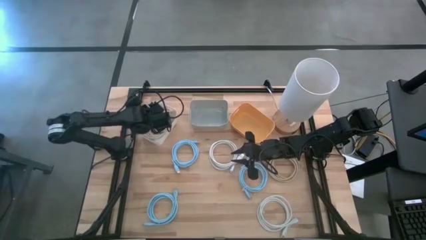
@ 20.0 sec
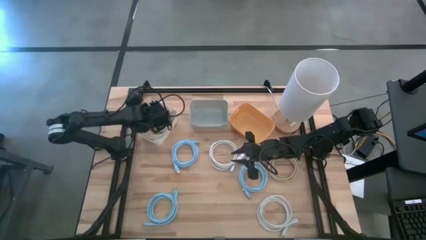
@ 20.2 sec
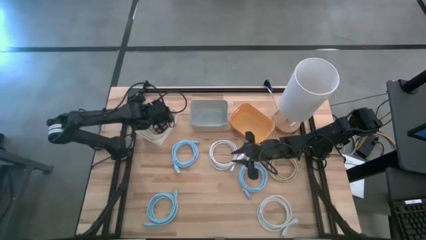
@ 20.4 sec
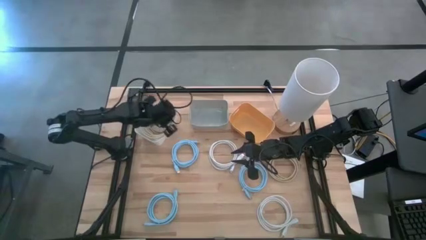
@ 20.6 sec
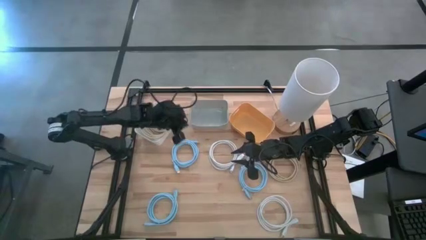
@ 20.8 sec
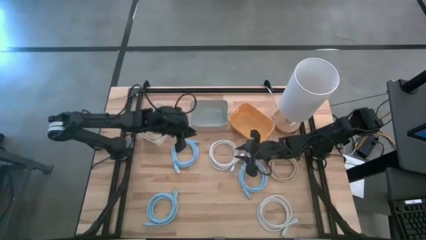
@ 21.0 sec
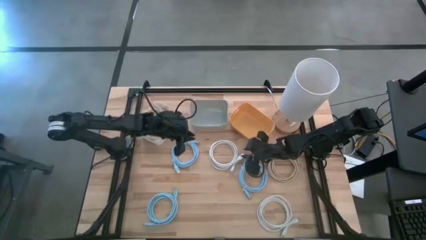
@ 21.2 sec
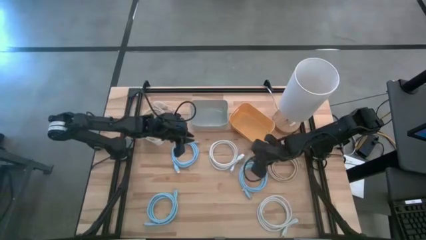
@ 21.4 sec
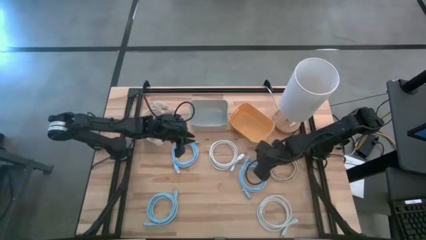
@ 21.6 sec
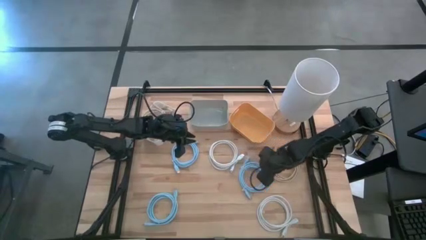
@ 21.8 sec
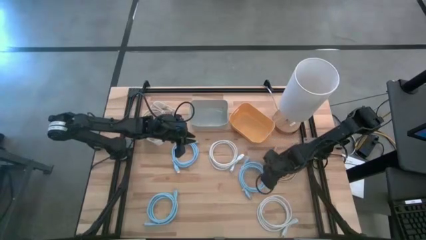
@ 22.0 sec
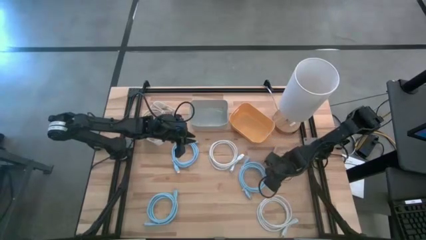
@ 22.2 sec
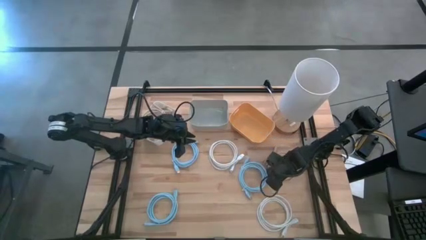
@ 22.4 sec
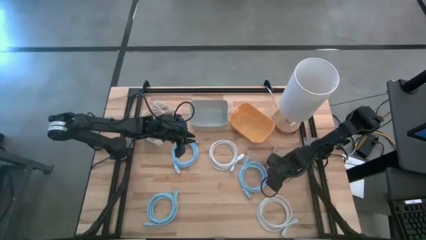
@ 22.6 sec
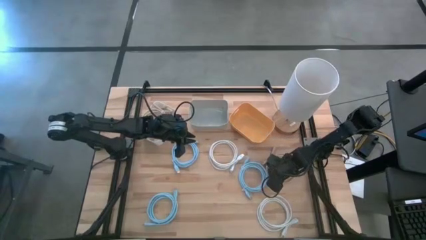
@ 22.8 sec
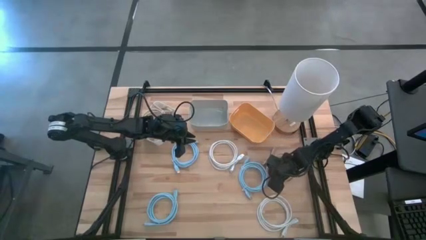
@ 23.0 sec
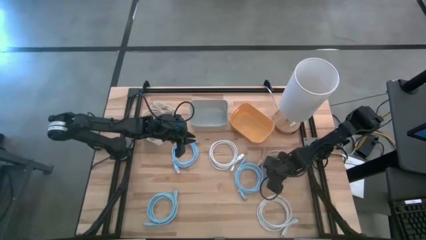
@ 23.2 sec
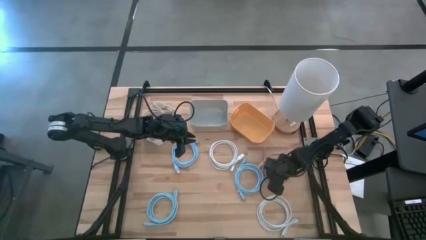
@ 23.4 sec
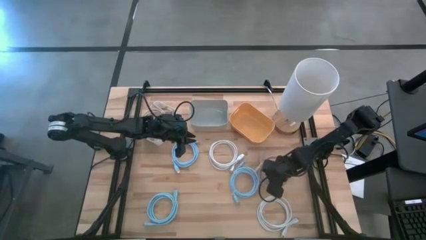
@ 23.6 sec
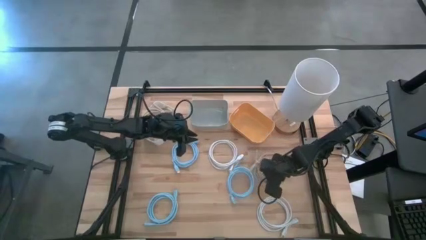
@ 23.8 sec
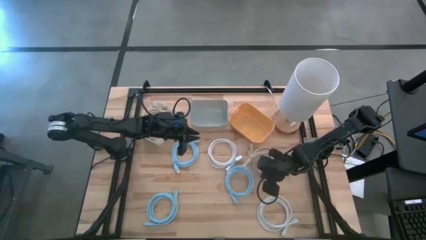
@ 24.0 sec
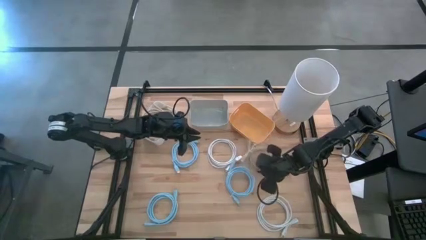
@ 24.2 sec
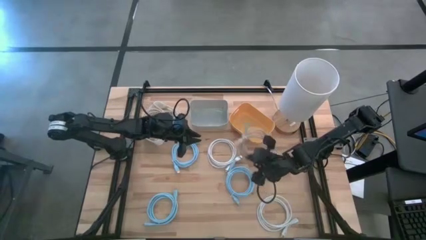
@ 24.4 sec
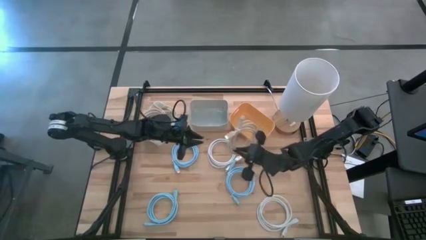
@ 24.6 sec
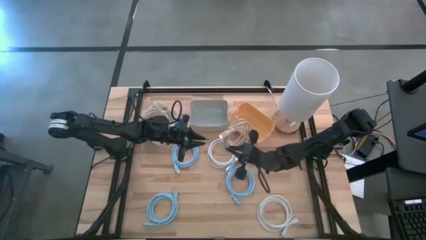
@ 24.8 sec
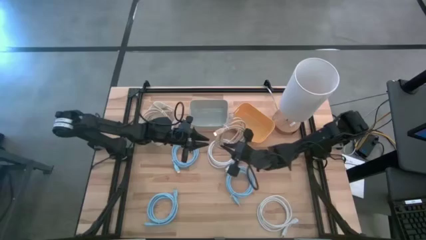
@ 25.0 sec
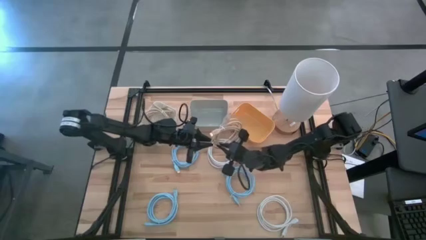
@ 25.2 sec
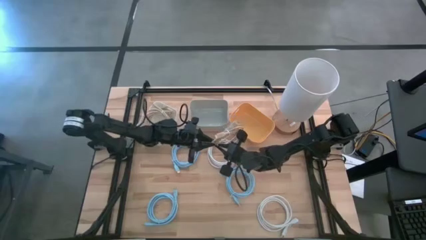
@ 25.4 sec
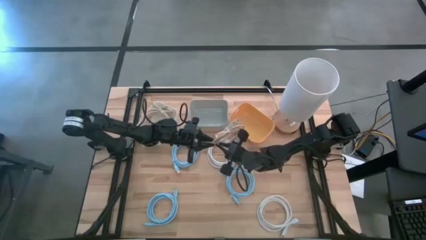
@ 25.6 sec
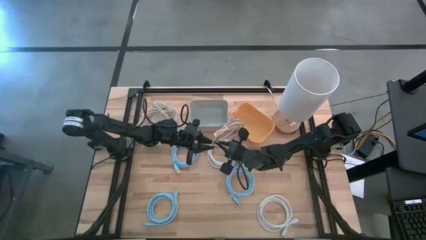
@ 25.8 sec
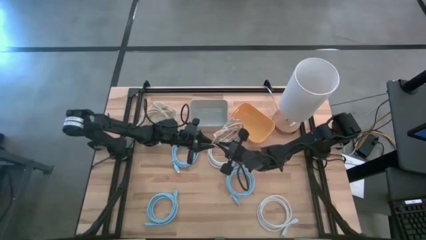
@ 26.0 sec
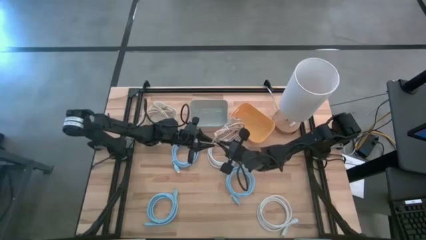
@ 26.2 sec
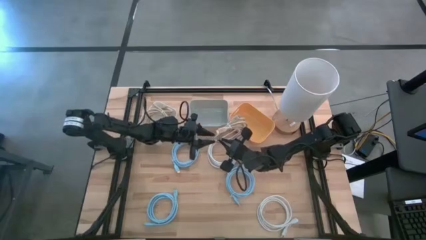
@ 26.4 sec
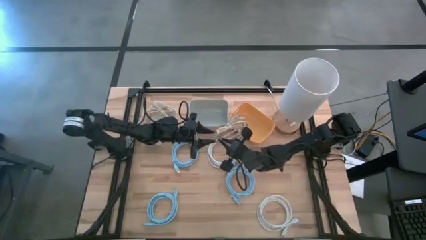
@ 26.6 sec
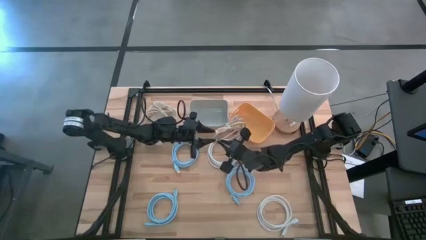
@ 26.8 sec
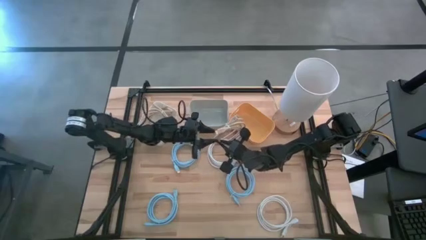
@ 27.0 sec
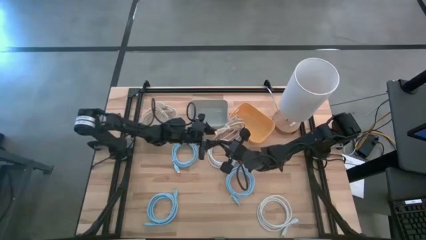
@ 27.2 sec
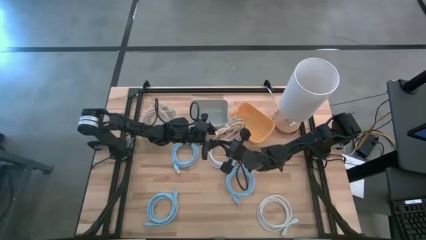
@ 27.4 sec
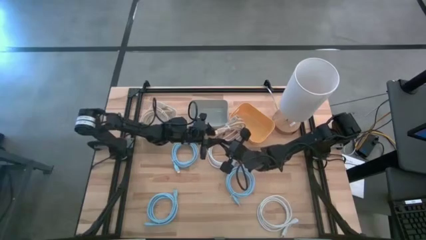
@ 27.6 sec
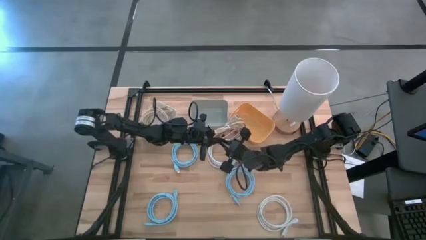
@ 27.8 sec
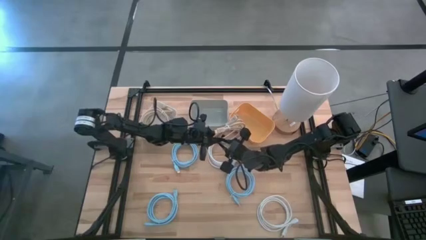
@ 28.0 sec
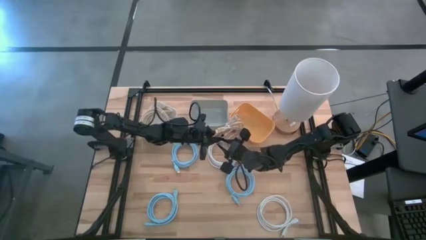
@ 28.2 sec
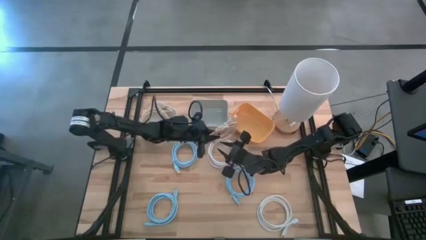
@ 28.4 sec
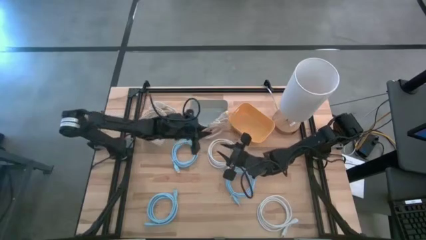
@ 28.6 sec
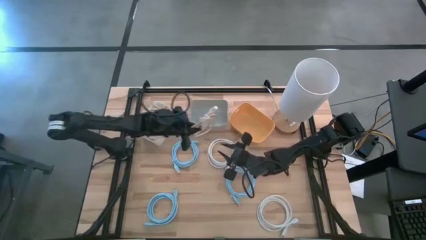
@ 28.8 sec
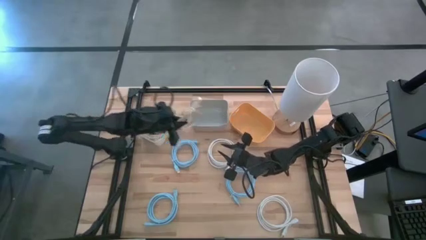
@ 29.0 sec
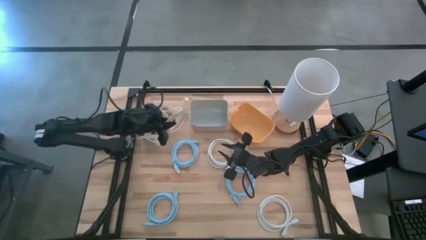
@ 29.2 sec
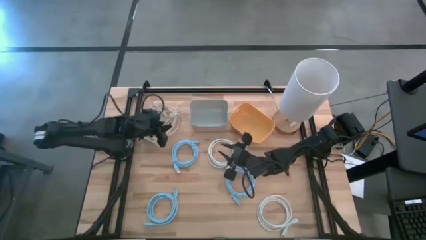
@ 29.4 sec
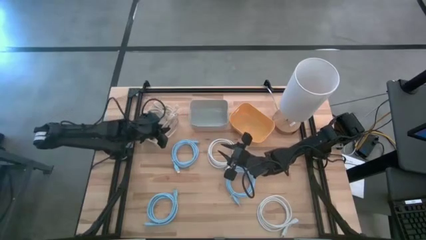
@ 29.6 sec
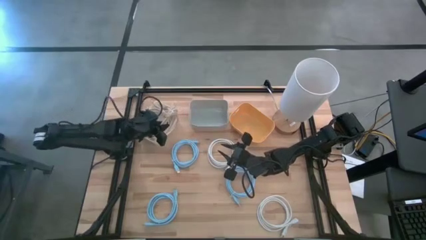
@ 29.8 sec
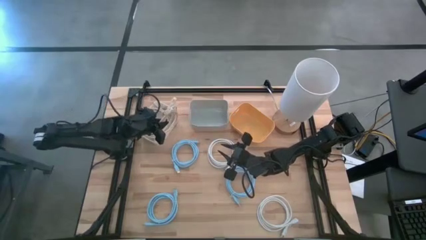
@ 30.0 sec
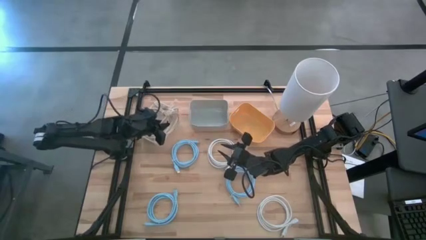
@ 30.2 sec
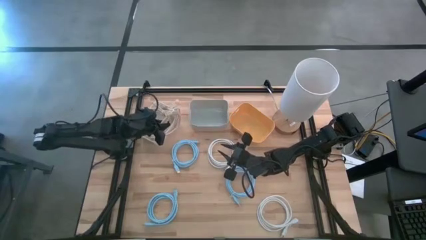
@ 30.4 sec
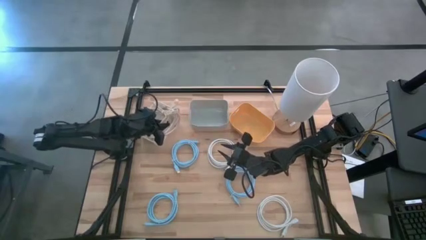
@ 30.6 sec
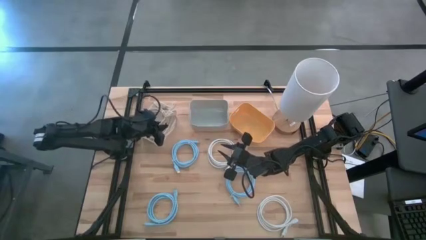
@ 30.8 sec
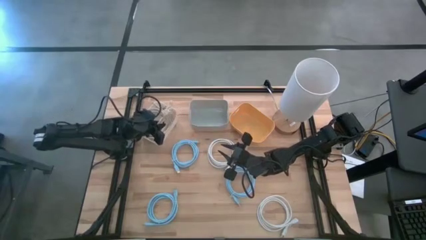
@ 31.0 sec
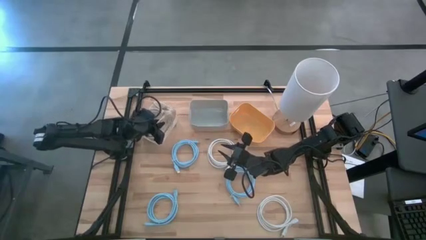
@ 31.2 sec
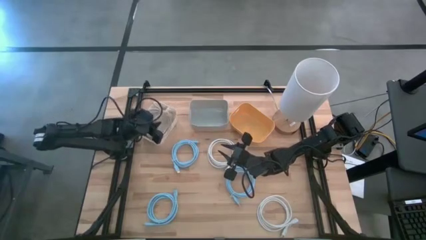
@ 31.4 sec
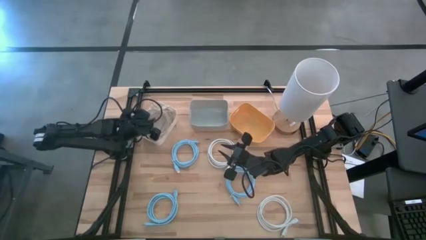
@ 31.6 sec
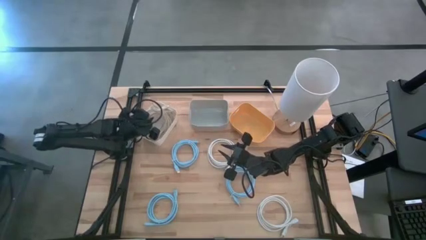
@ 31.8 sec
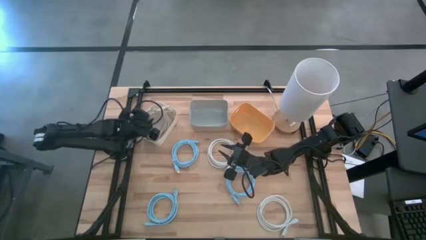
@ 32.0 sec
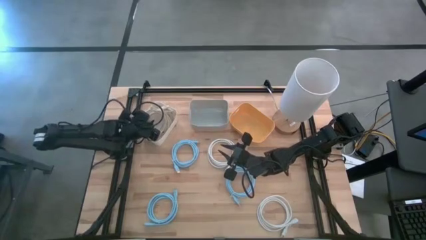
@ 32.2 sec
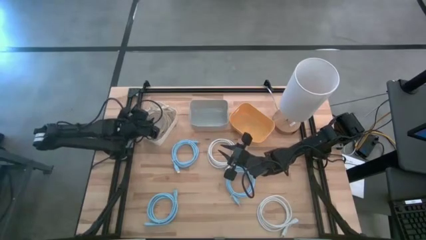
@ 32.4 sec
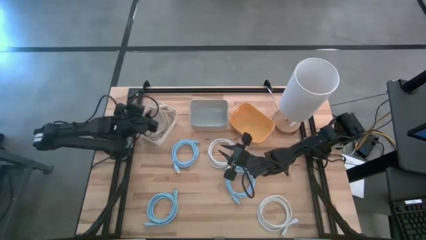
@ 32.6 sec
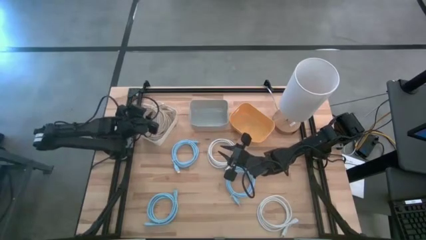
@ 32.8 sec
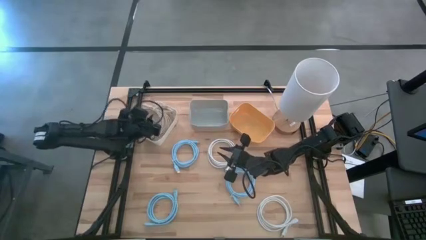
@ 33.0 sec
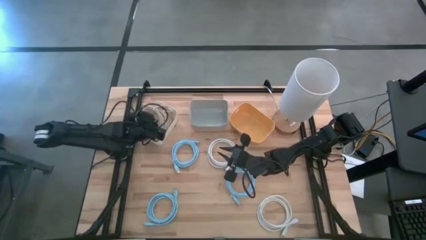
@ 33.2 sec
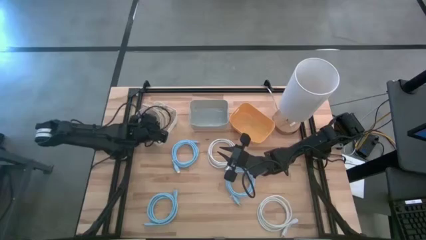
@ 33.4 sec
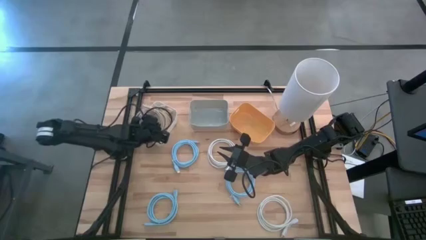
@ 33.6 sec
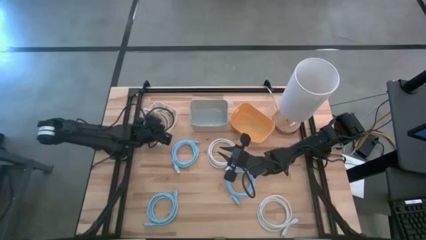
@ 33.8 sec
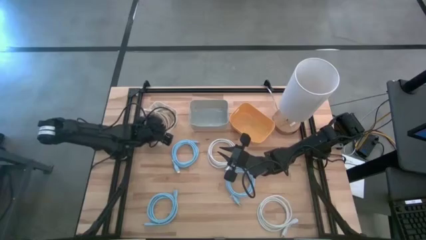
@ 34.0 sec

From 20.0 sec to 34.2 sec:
Task: Sort HDMI cables
Put the brown HDMI cable into the white bin
